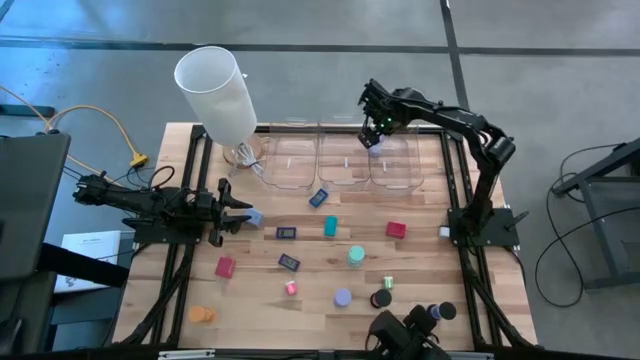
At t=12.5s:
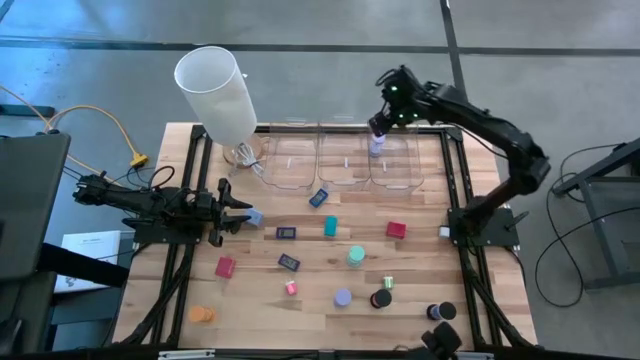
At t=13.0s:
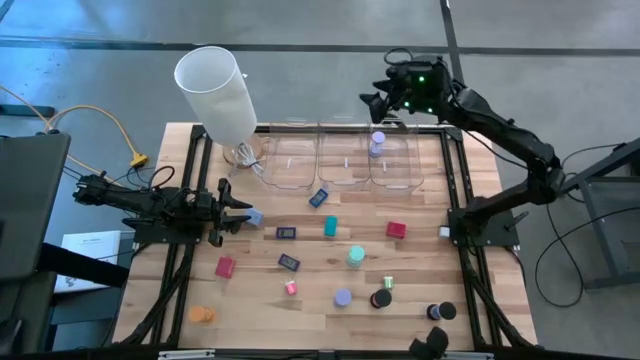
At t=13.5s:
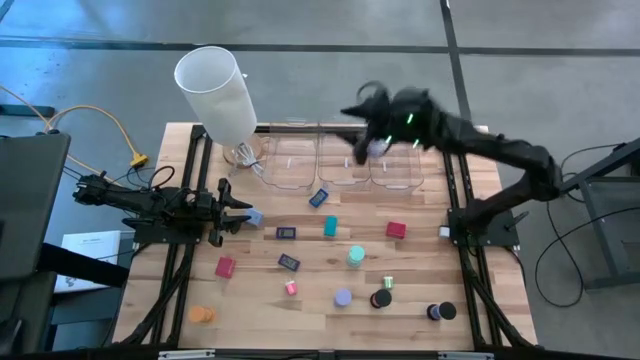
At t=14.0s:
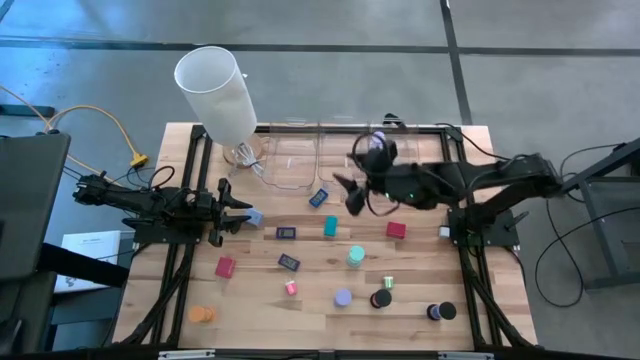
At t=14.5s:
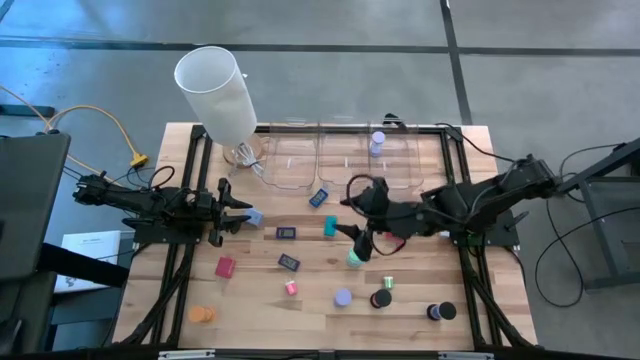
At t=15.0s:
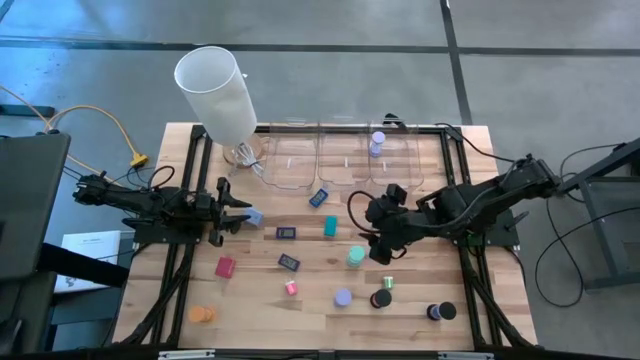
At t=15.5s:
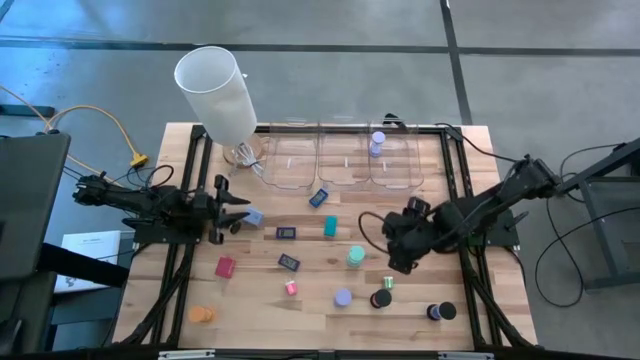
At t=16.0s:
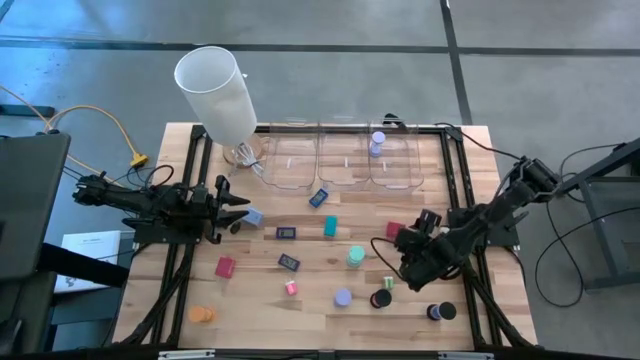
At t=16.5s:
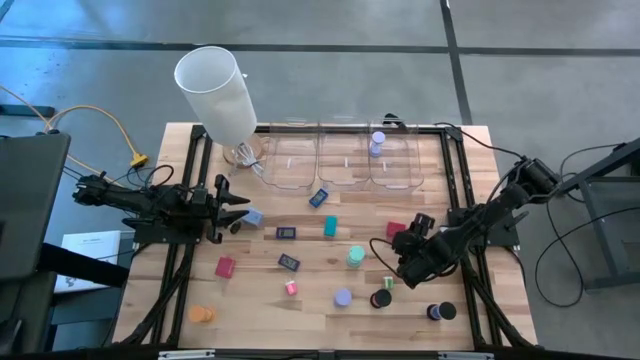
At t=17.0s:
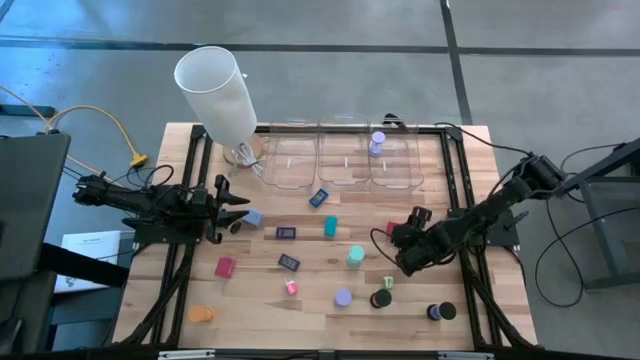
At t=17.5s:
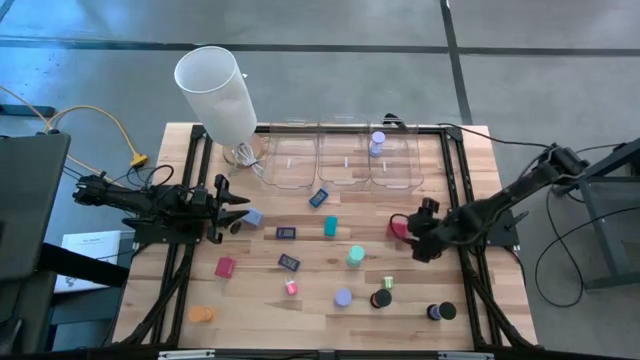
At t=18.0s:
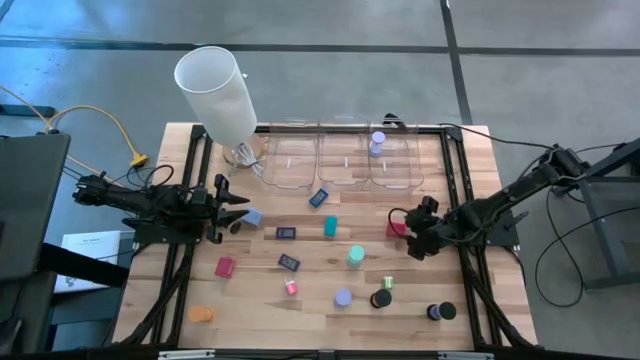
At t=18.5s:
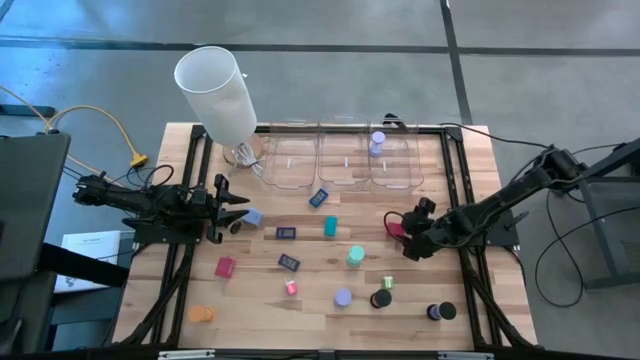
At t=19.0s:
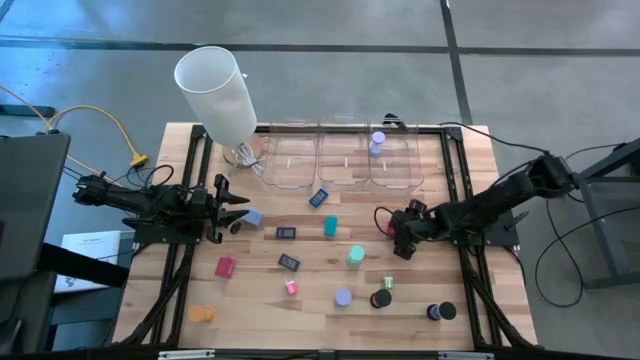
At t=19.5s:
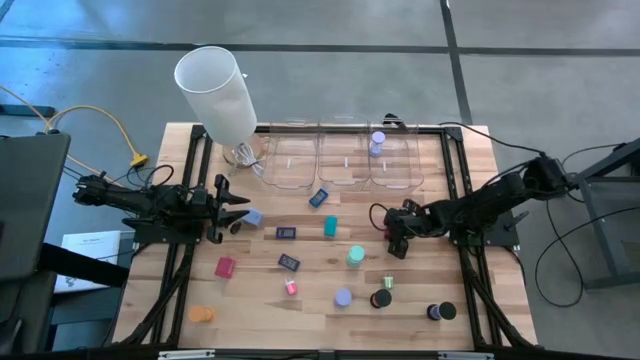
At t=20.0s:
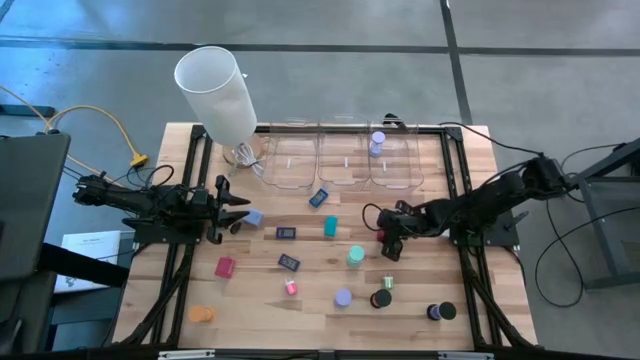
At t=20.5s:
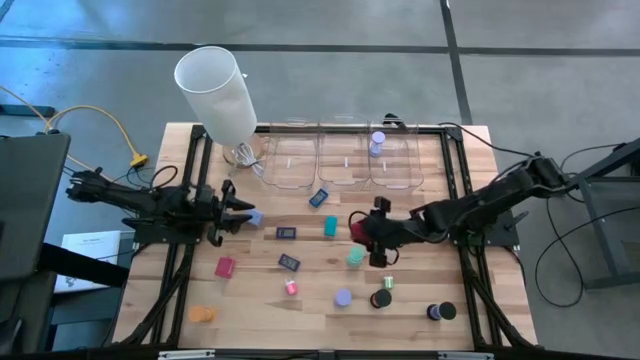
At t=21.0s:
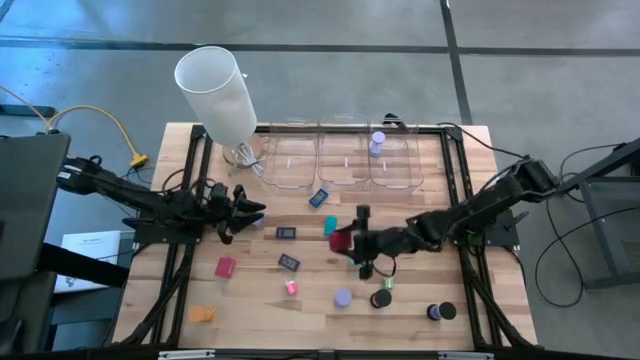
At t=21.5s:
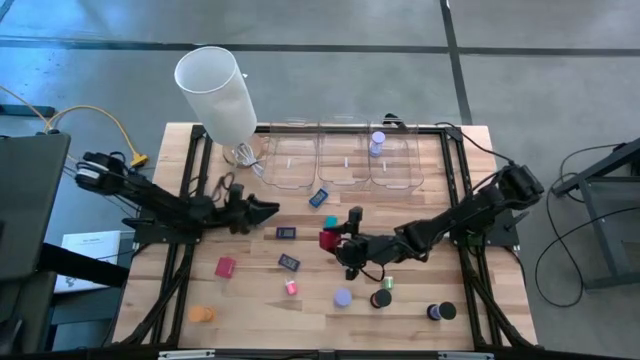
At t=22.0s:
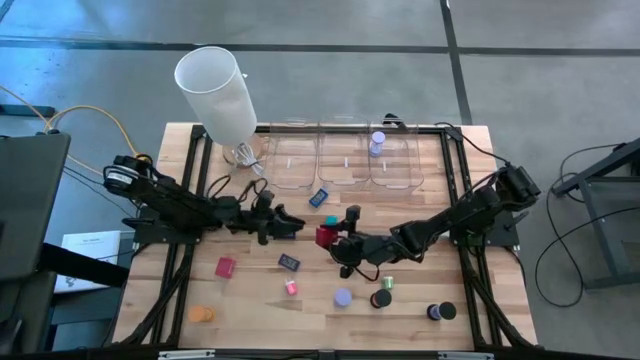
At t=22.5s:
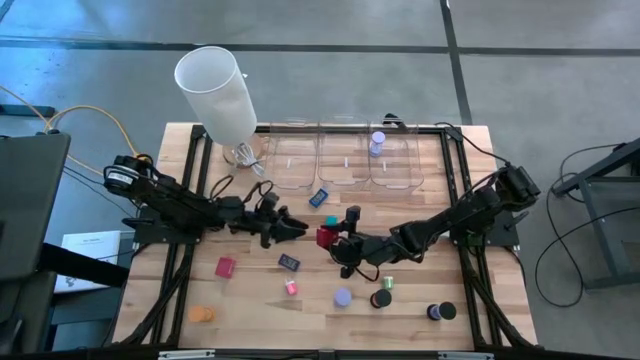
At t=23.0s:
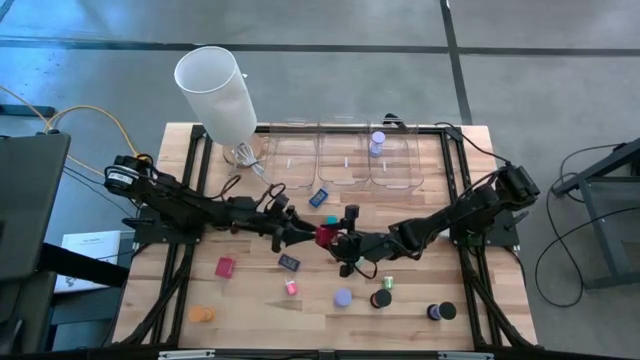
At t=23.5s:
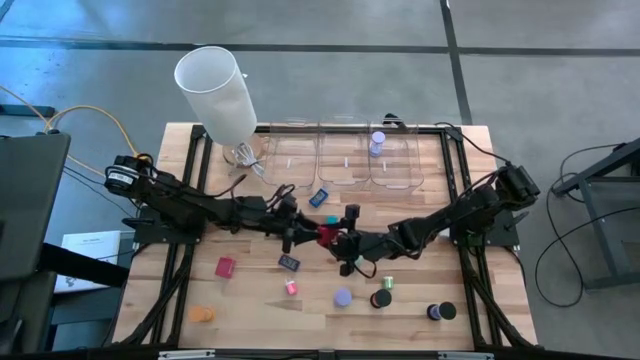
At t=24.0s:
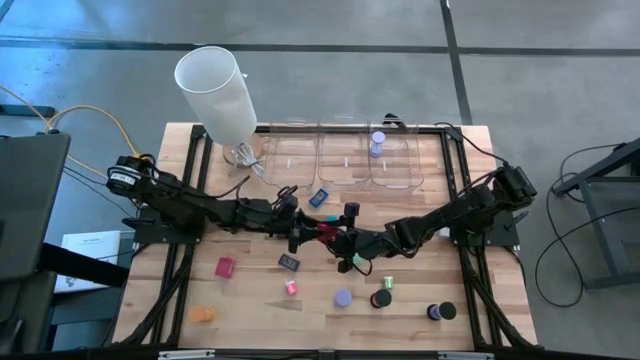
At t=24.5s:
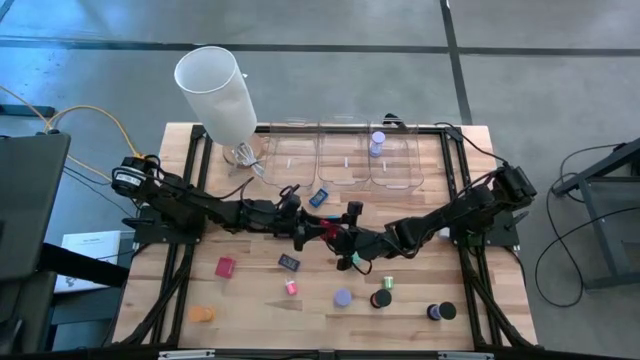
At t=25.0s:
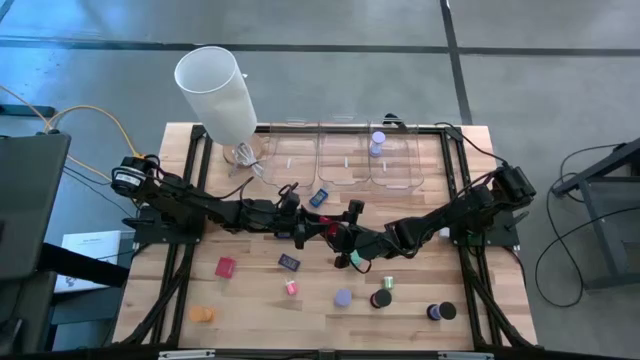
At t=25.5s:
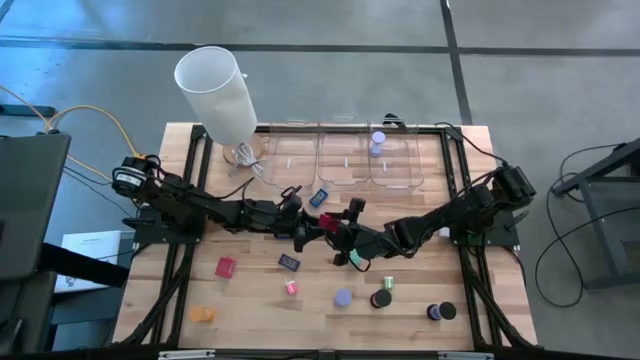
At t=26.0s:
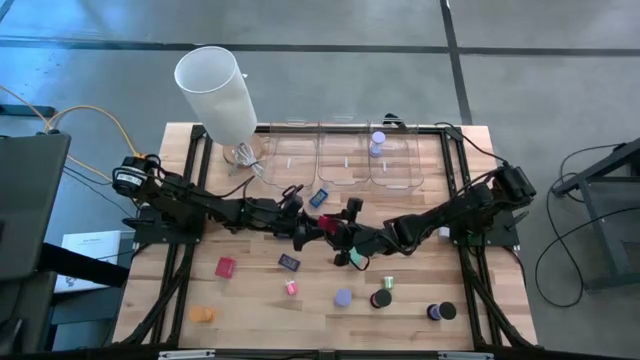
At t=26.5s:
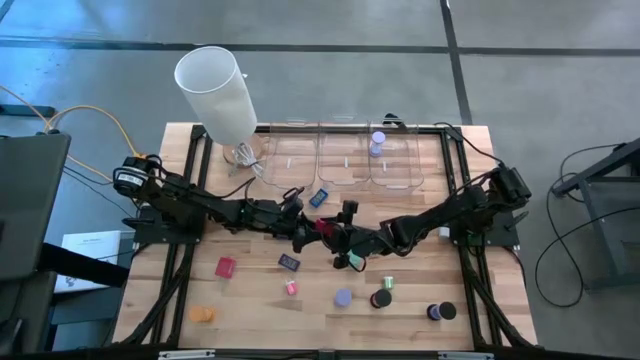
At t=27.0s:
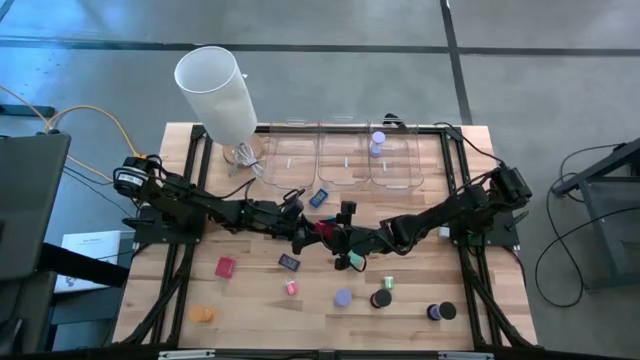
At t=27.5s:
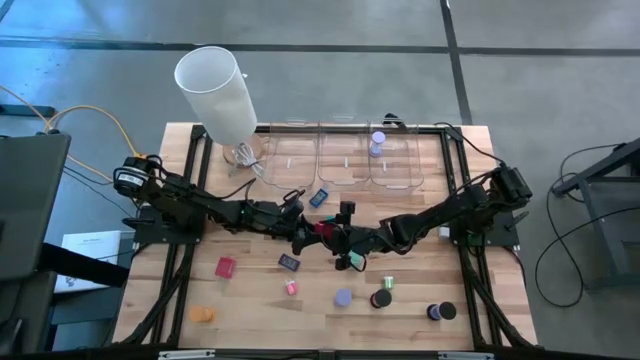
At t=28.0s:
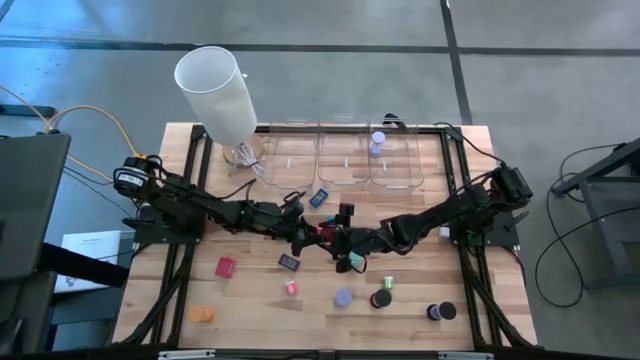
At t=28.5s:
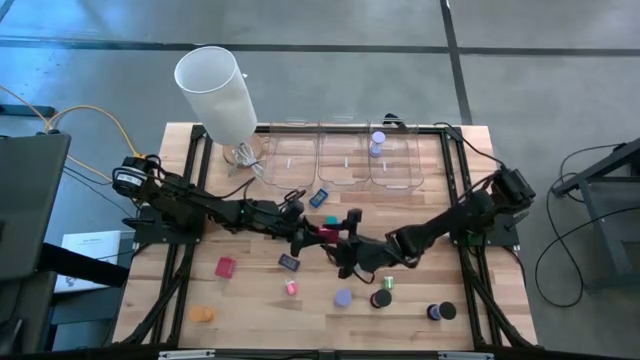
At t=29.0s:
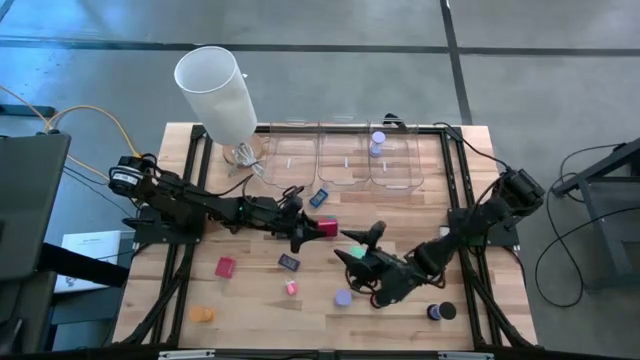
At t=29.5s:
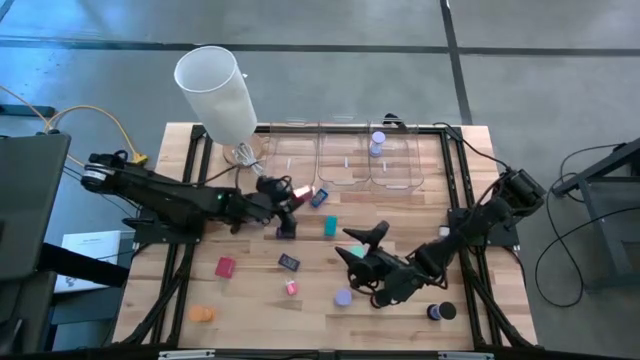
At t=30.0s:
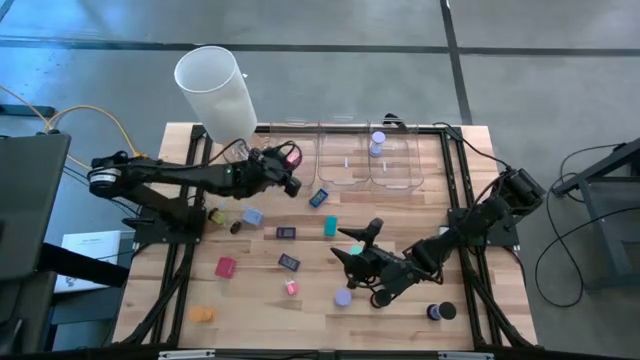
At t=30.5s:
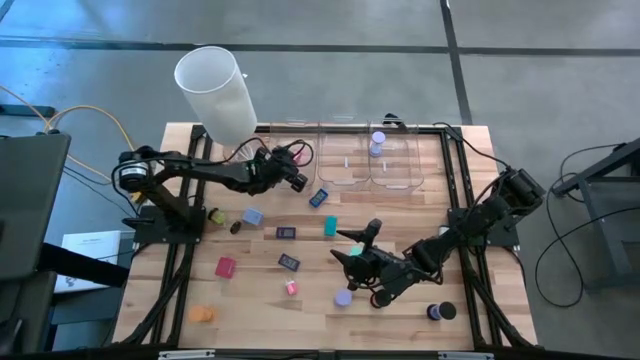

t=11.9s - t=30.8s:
Task: Pick & Place Office items
Put the right red charger adapter into the left transparent bin

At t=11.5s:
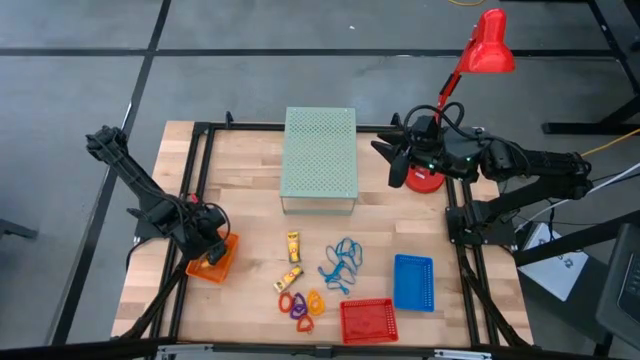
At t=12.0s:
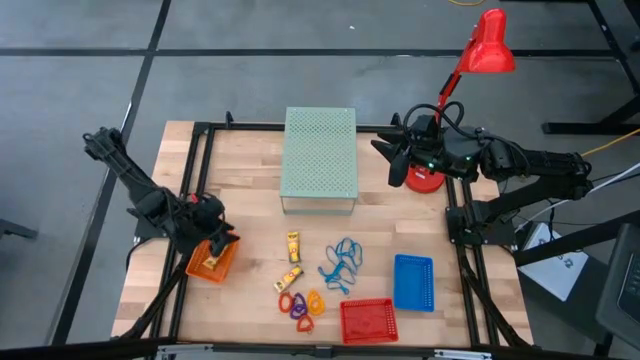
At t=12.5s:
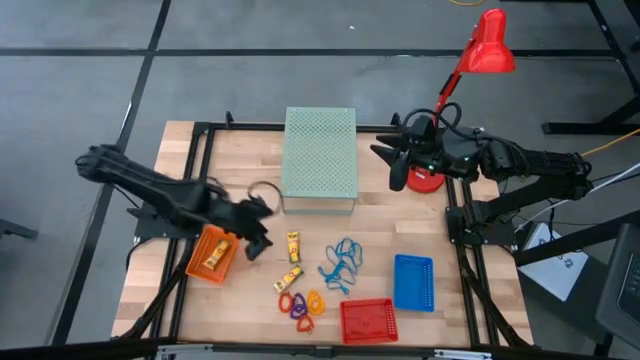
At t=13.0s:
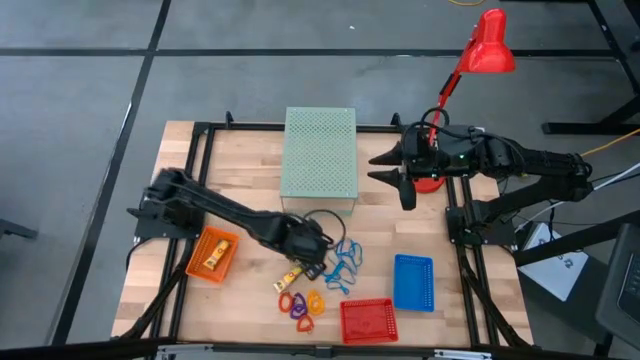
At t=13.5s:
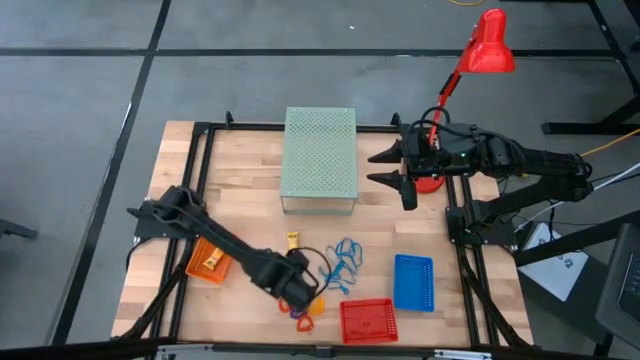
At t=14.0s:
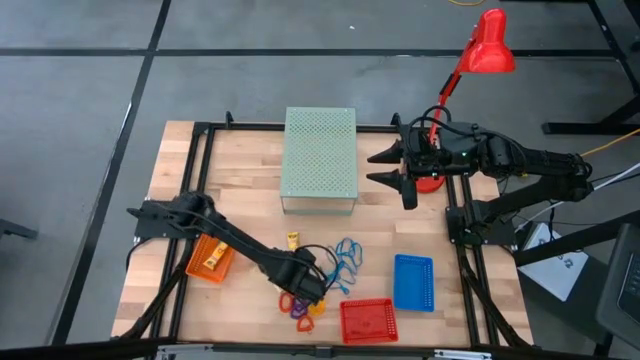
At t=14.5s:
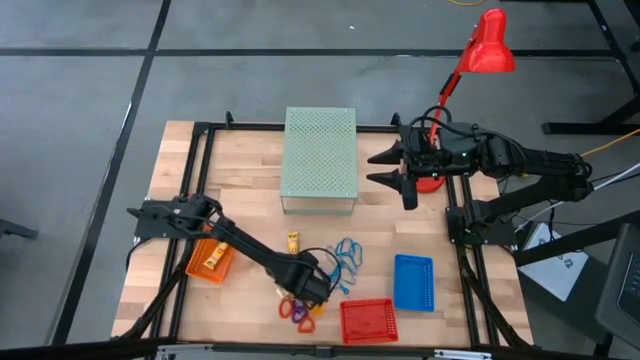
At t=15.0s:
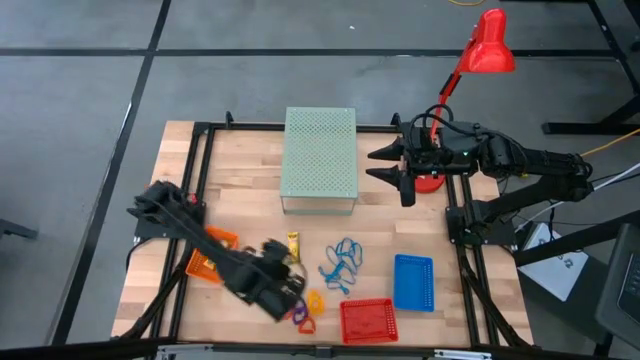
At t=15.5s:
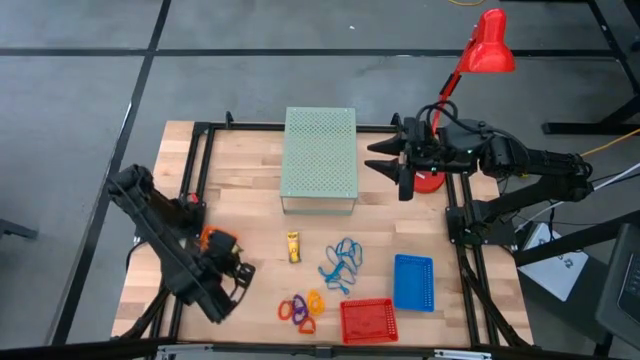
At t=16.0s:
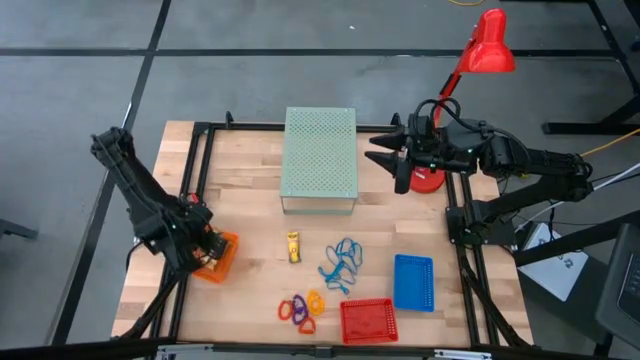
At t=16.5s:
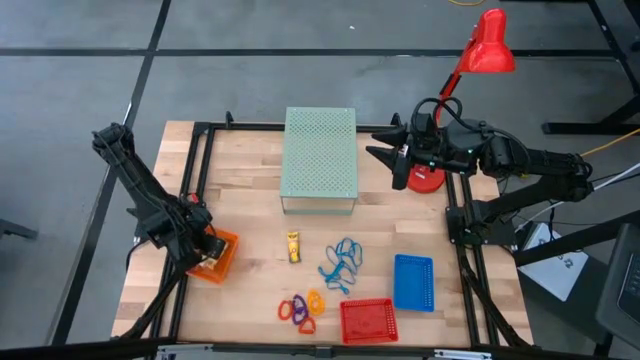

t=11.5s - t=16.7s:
Task: Pick & Place Office Desk Supplies
Put the yellow crayon box into the orange bin
